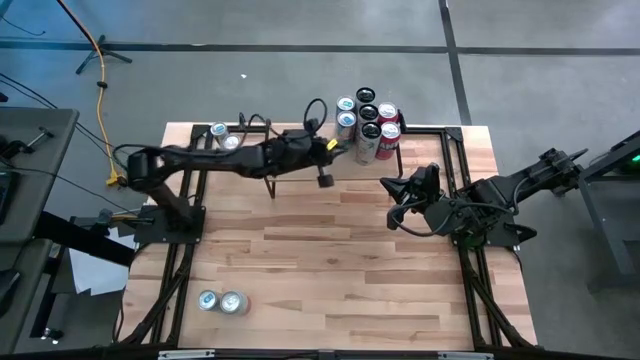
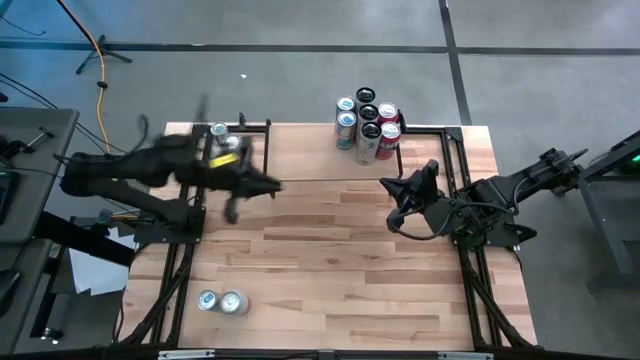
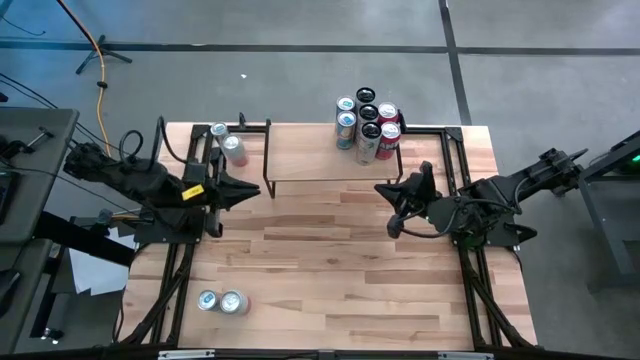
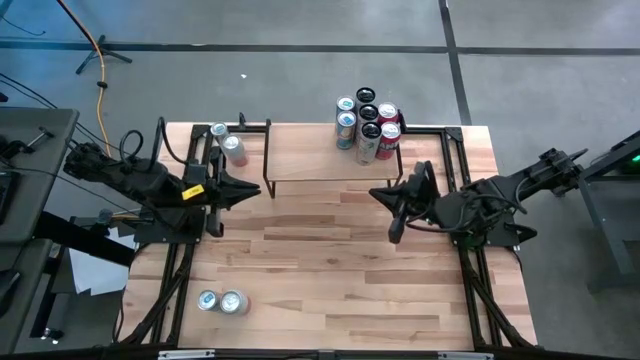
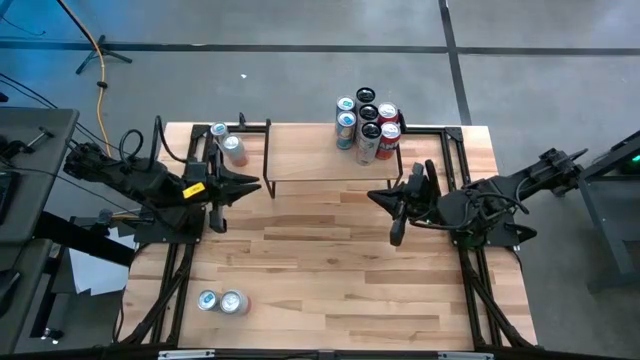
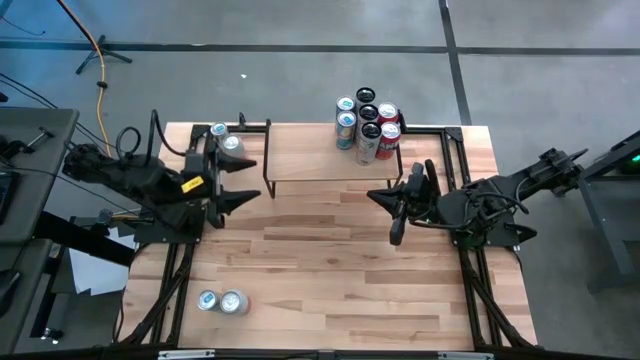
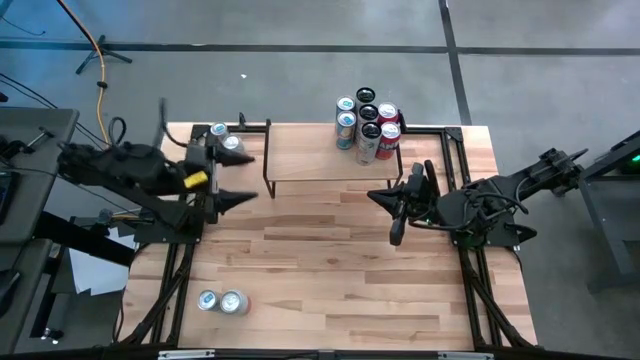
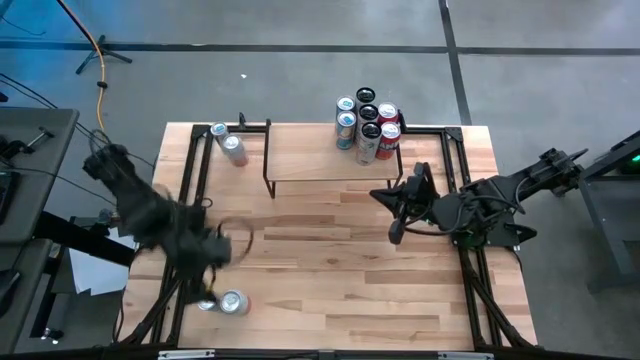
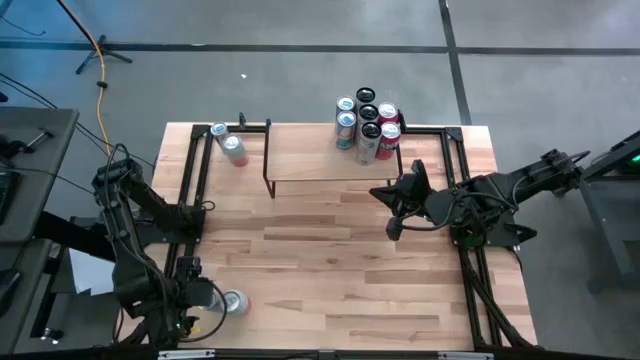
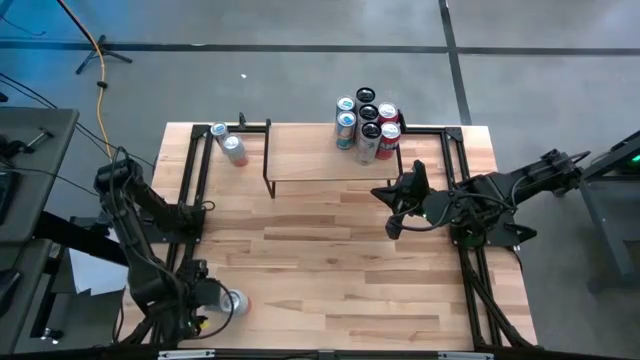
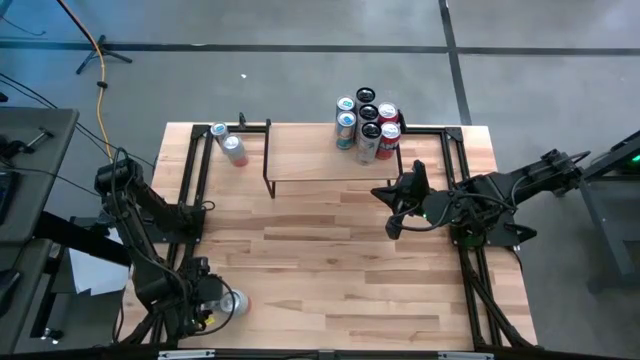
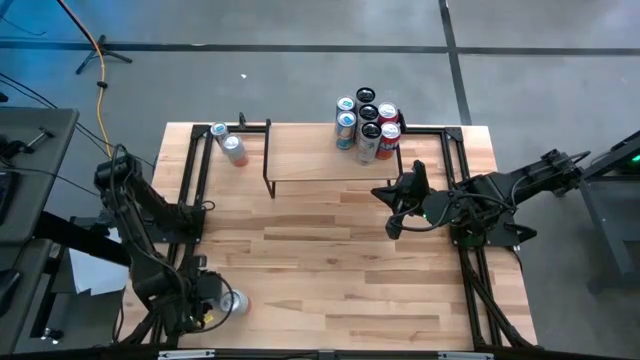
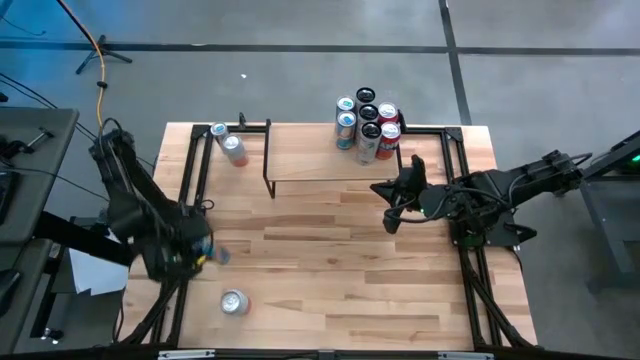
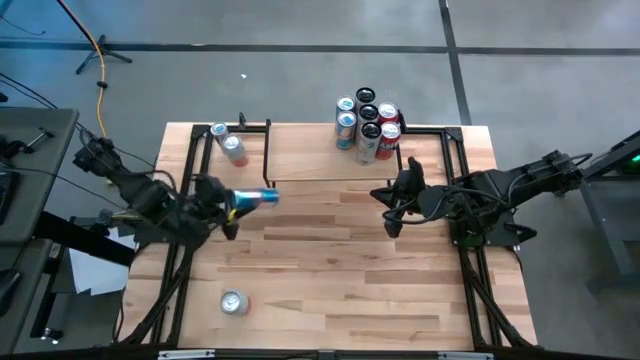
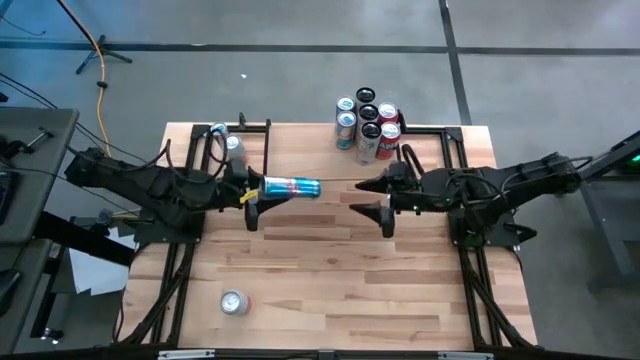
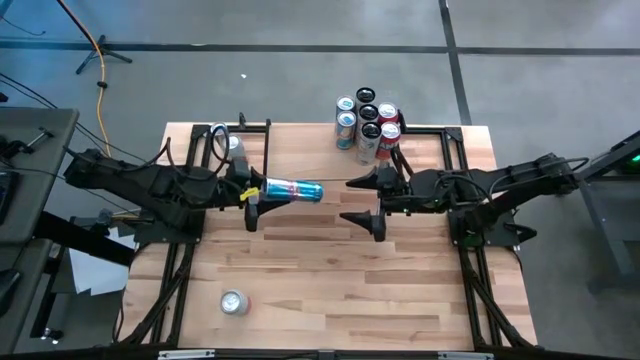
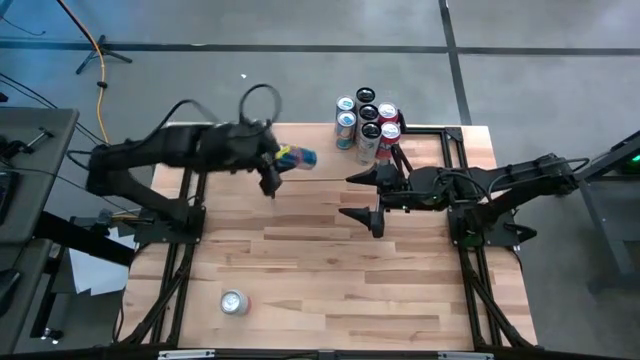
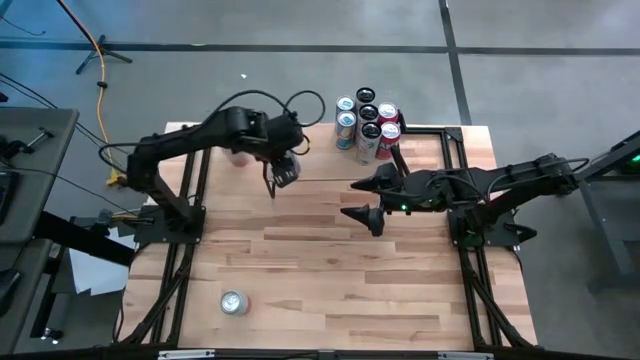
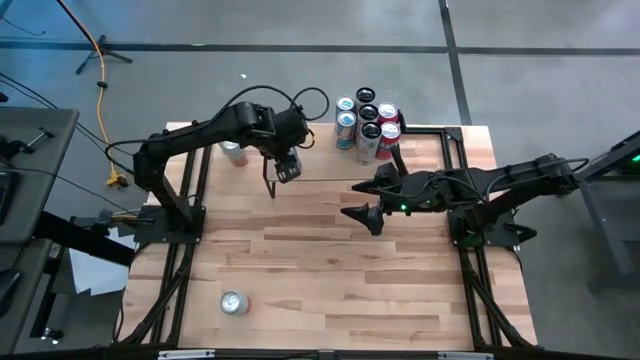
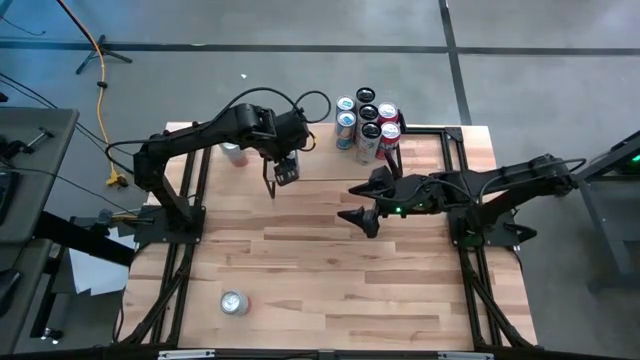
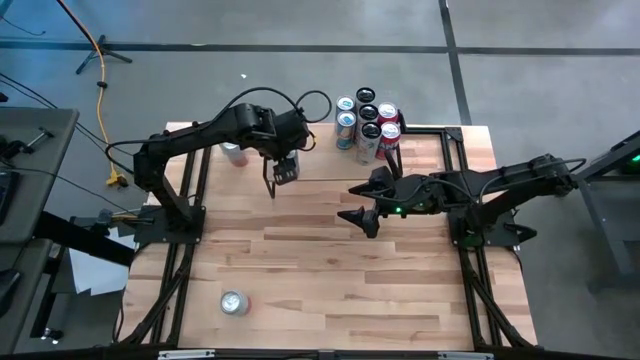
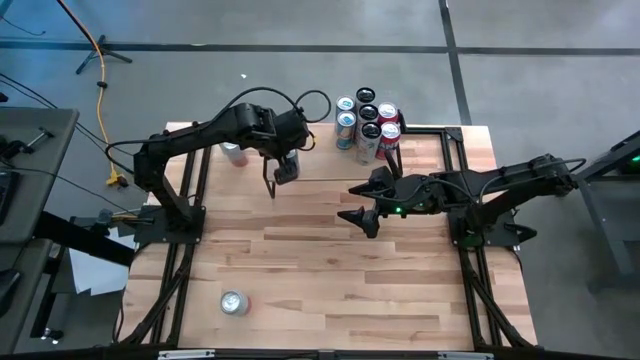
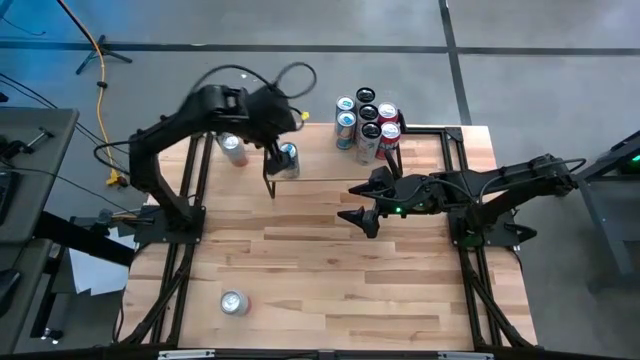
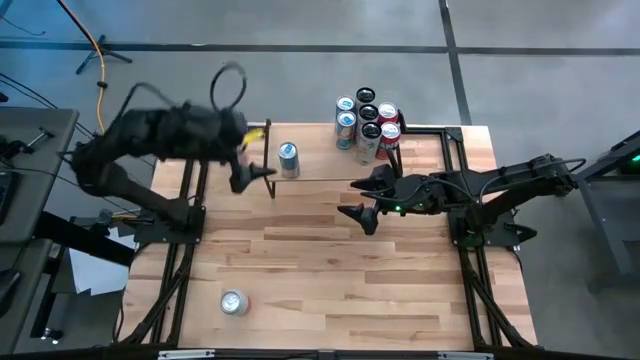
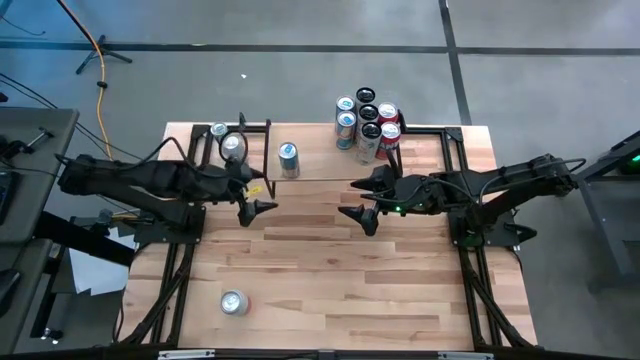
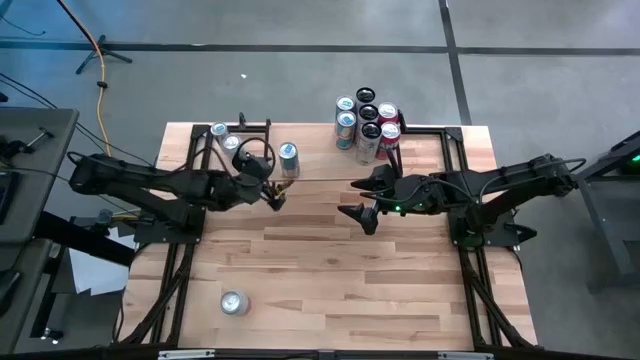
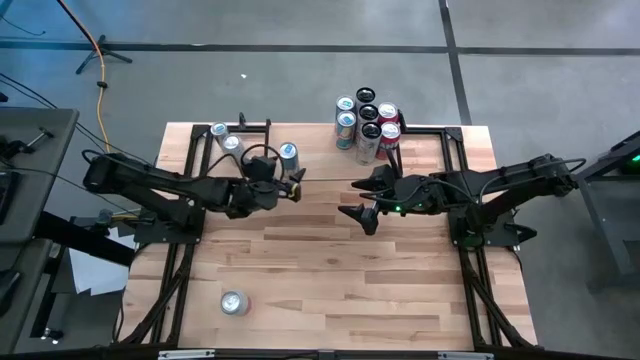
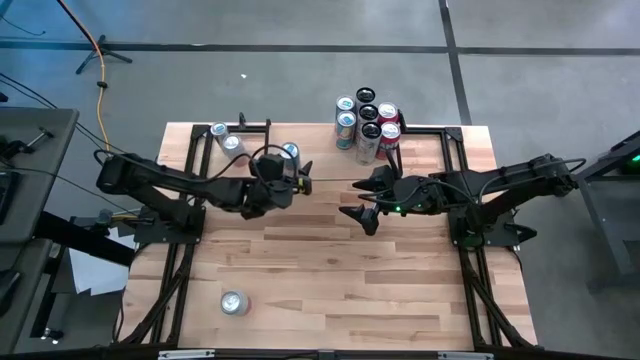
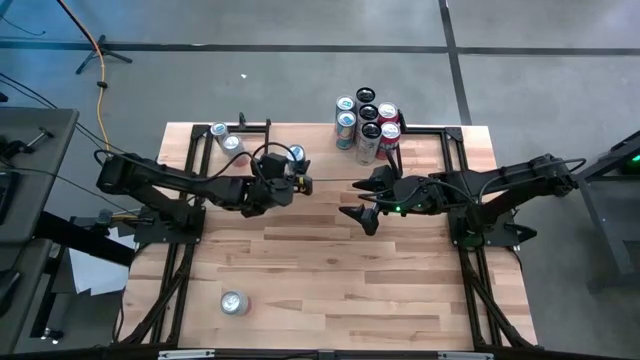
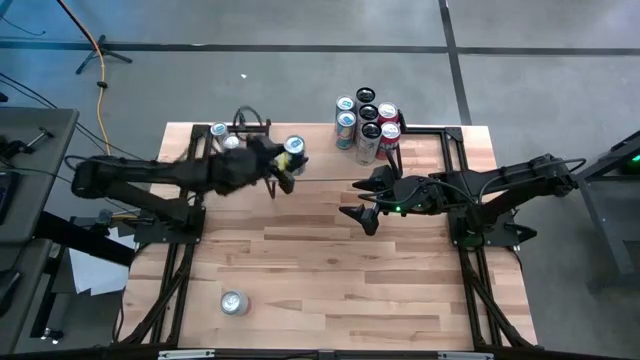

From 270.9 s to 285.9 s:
Task: Place canned beverage on shelf
Put the bottom blue soda can on the shelf aligned with the blue soda can

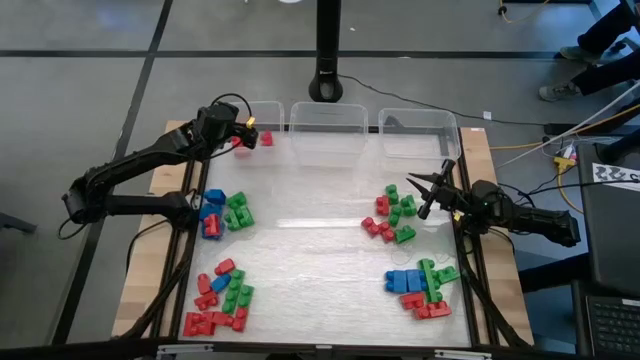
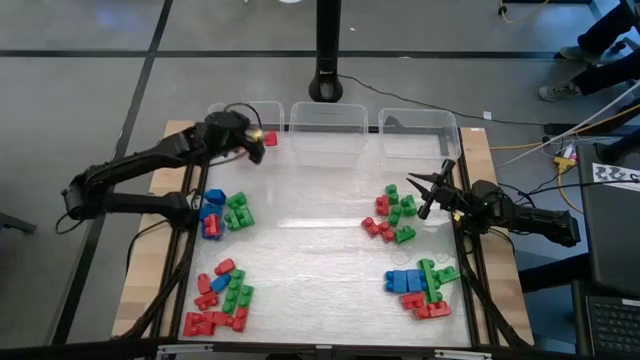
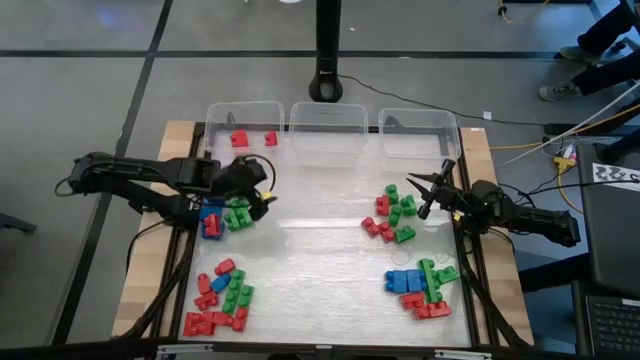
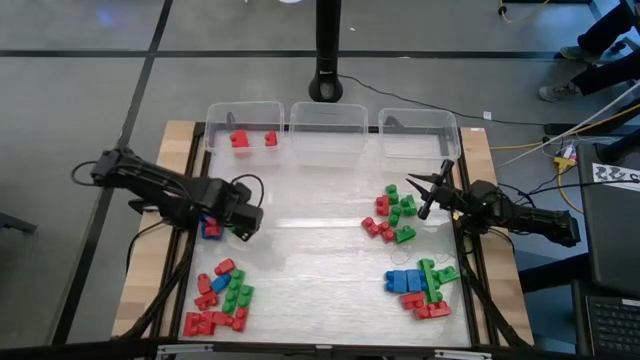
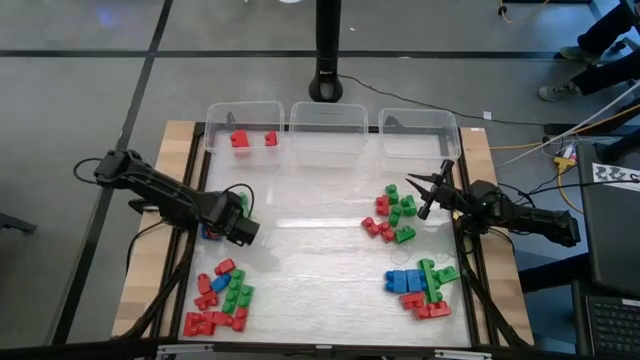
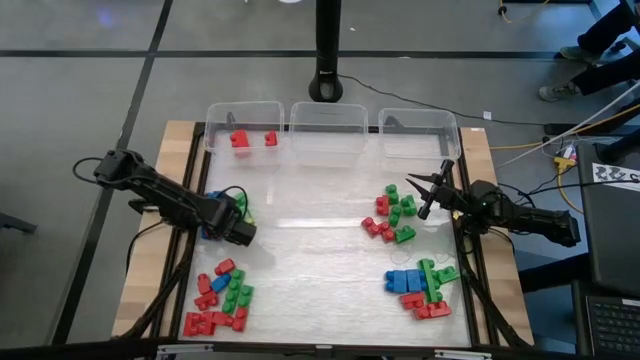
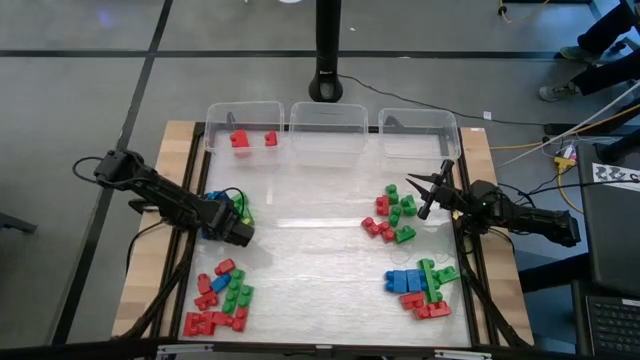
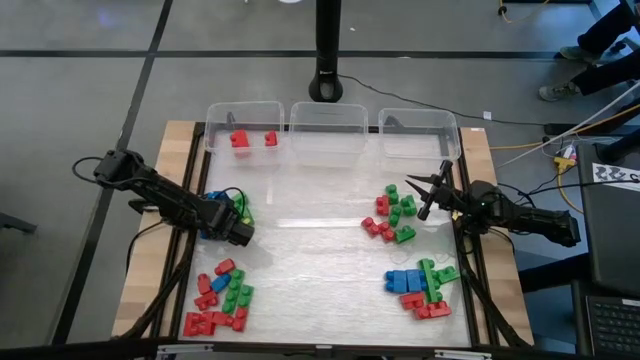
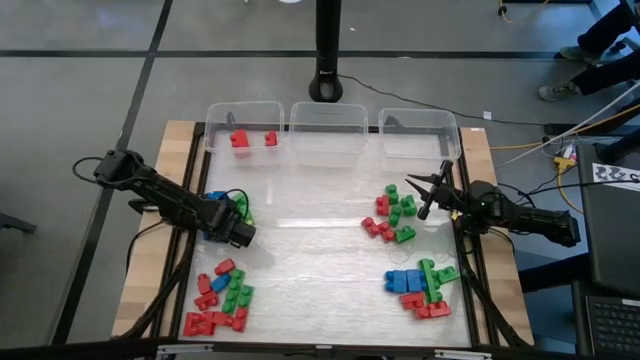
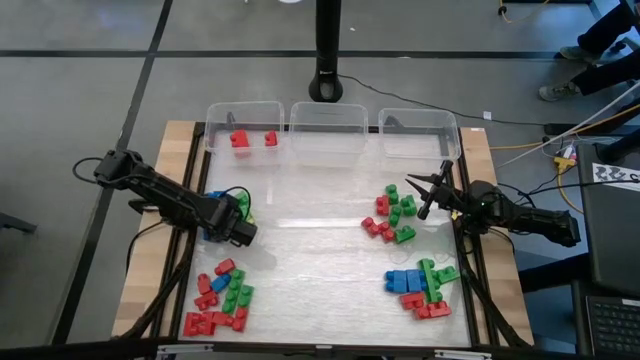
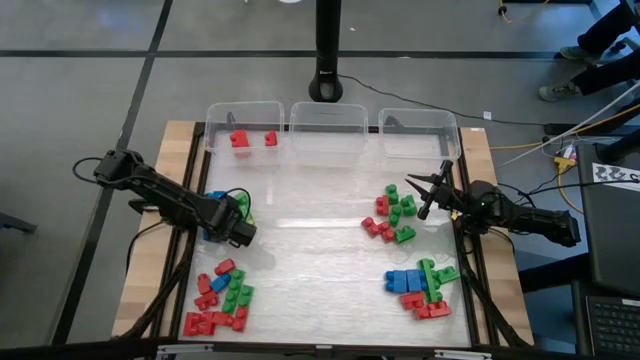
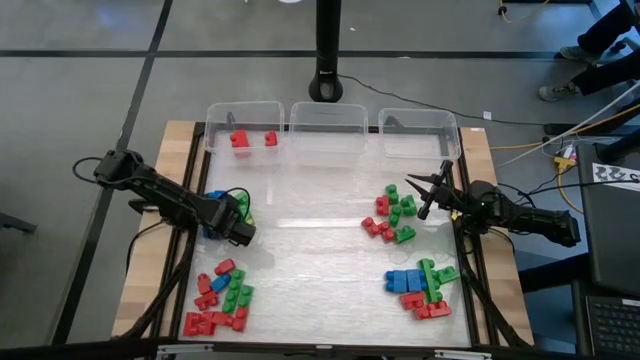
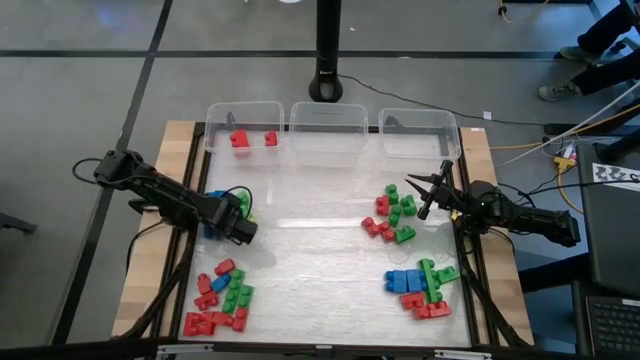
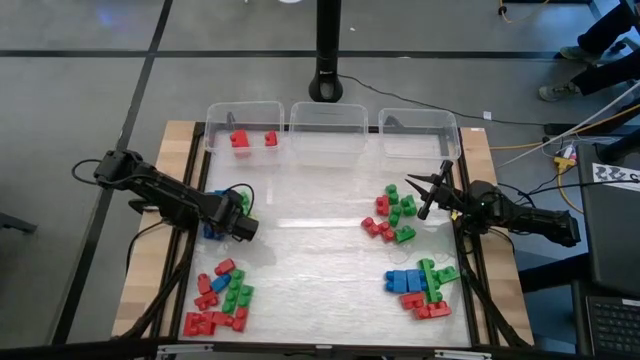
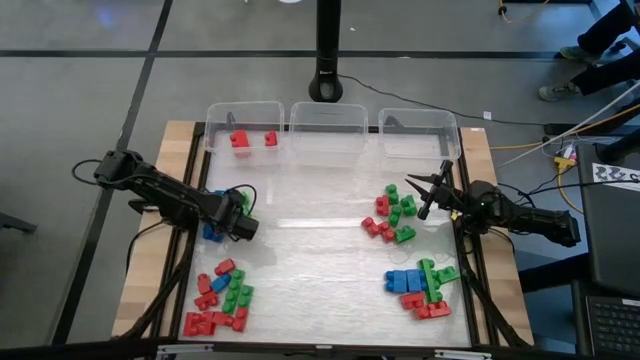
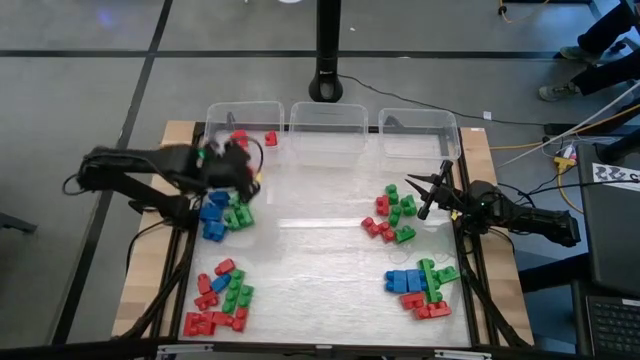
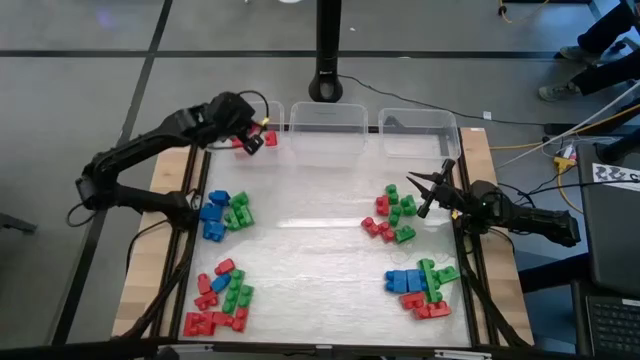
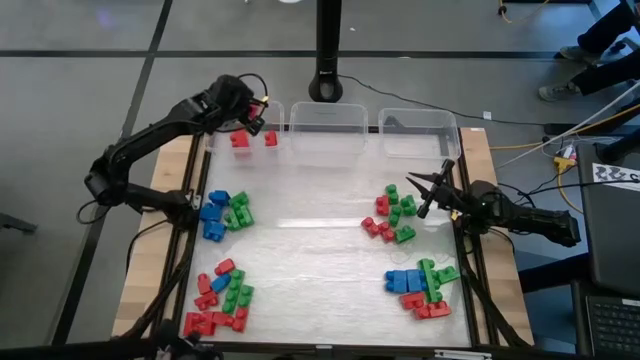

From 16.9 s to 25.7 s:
Task: Sort blocks
Put the red game piece into the left transparent bin
